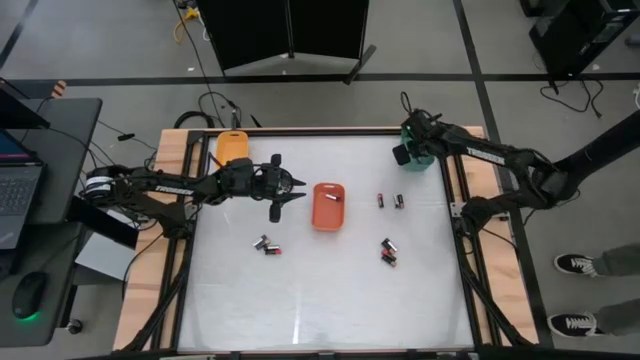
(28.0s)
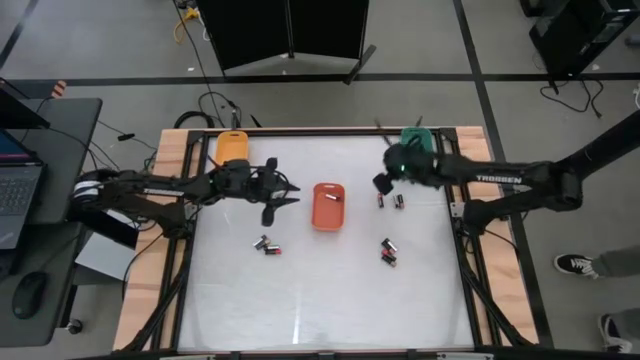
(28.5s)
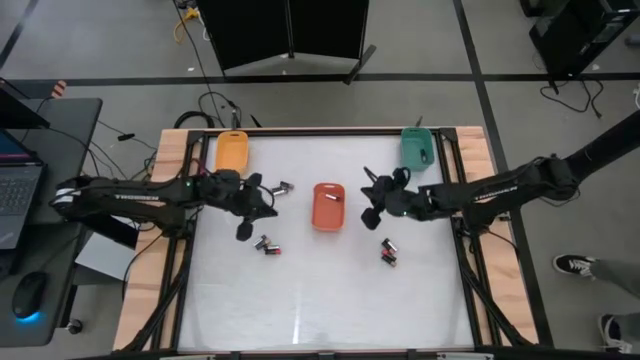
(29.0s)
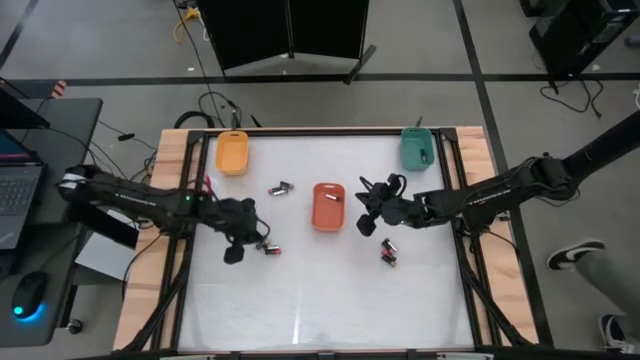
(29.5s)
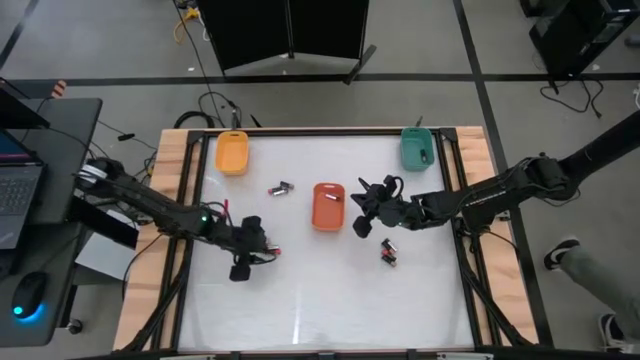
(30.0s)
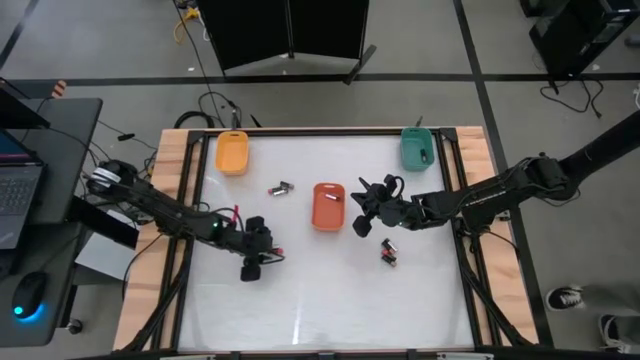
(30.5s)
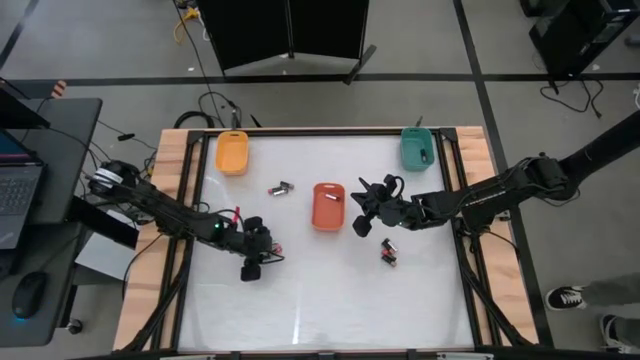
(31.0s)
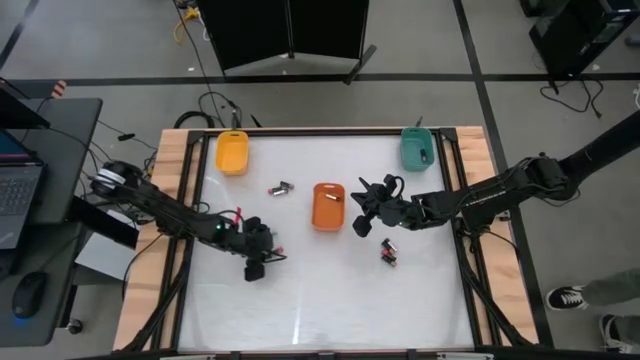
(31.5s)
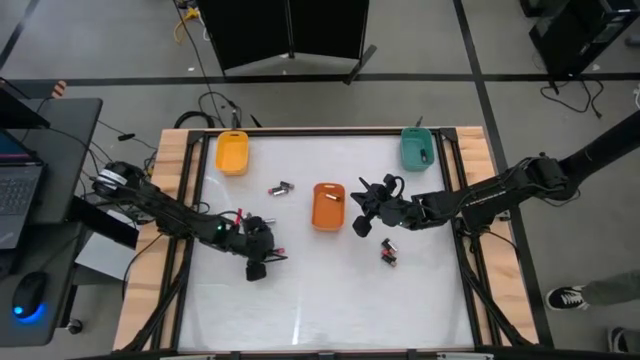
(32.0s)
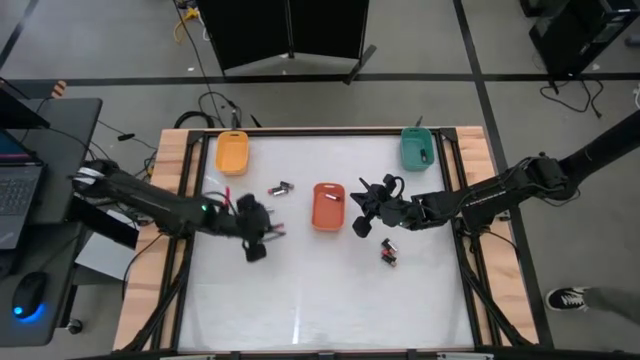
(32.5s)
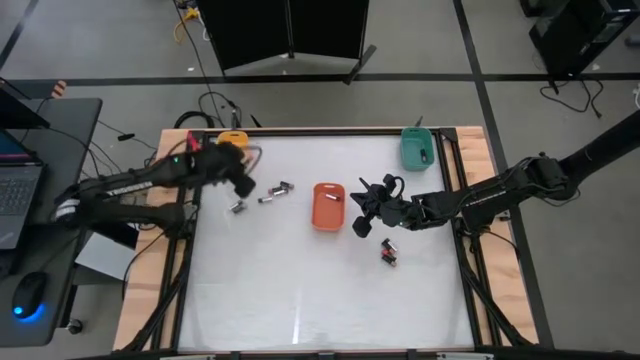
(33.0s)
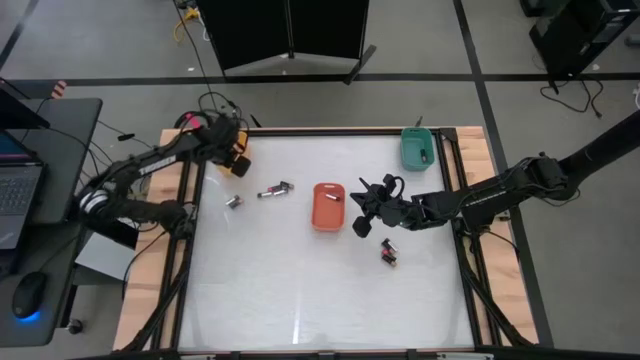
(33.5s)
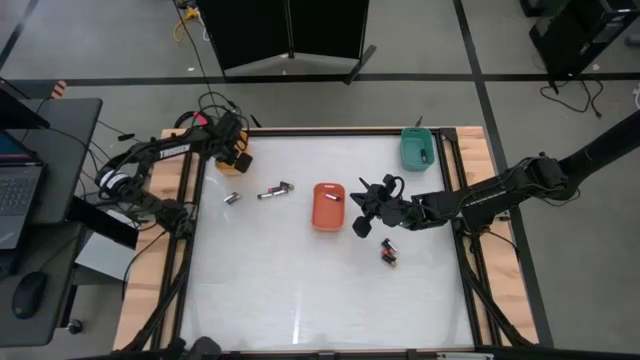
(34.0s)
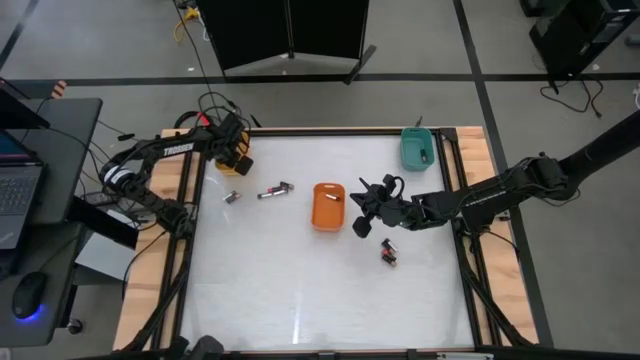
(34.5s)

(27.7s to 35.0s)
Task: Sort batteries
Put the black-red battery into the yellow bin

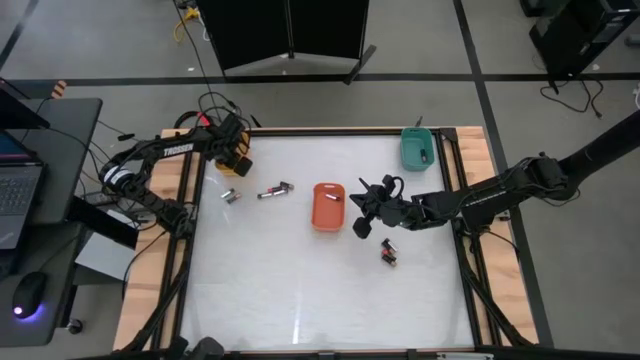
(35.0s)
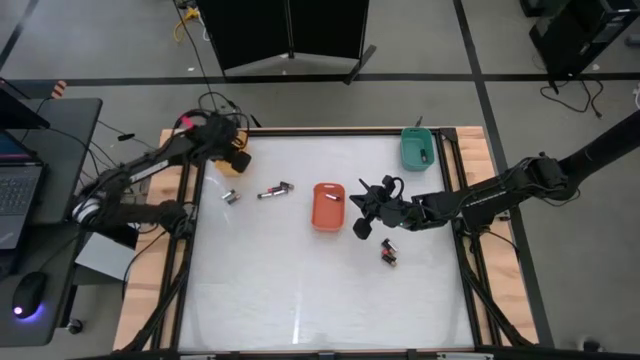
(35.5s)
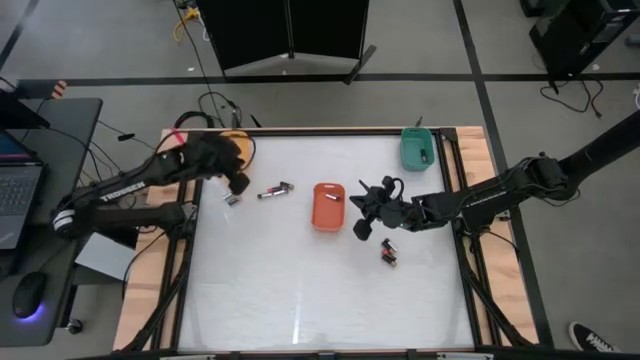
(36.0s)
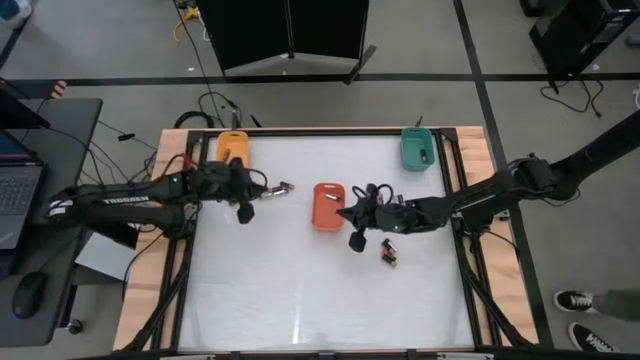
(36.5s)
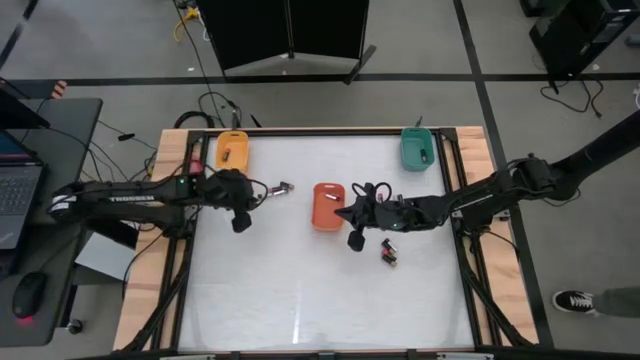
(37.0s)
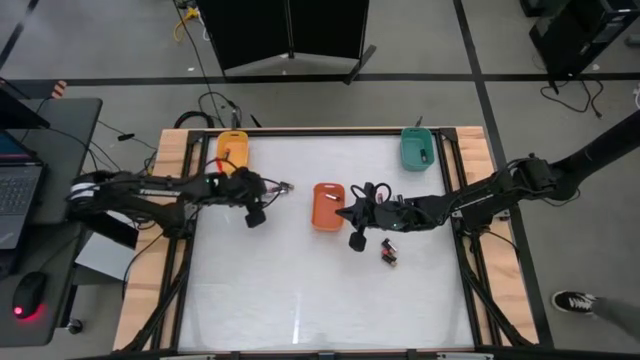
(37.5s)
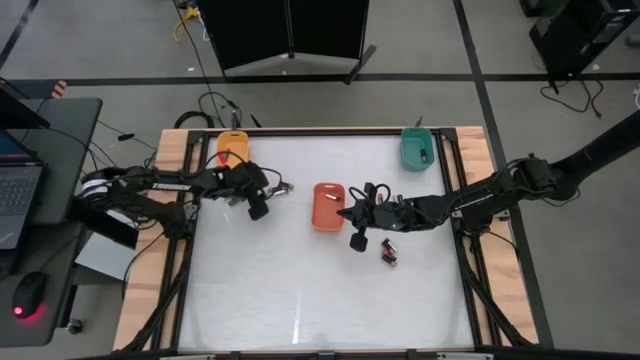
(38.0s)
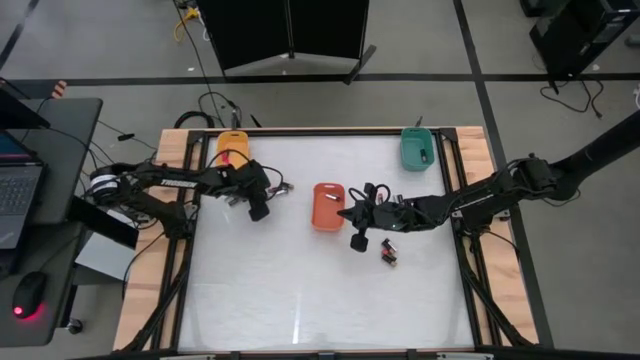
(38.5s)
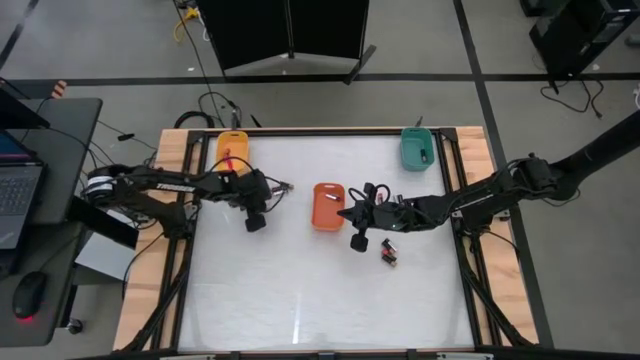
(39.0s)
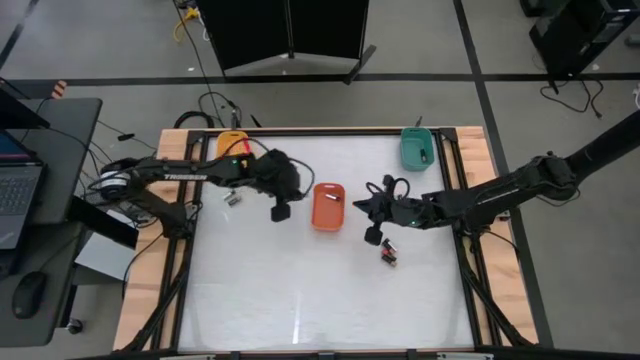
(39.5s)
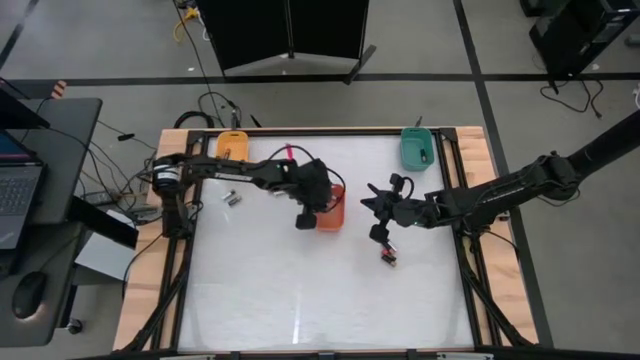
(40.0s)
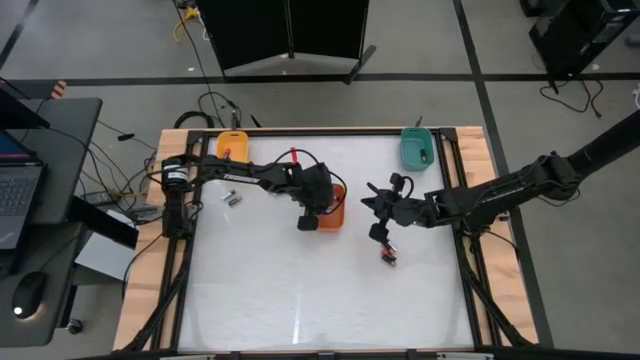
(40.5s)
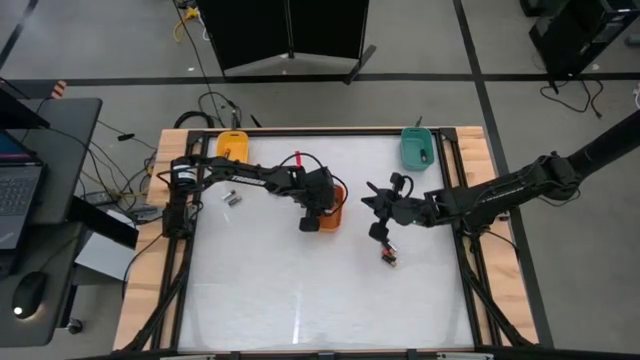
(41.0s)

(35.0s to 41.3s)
Put the silver battery into the orange bin

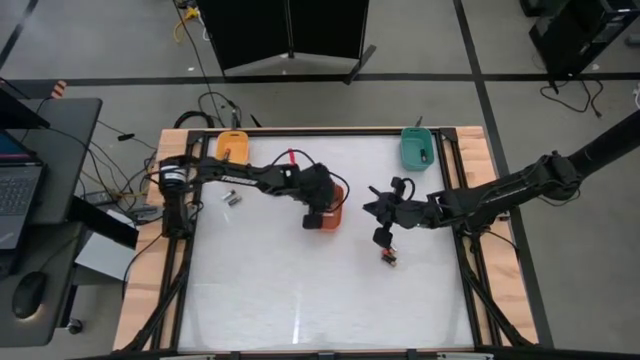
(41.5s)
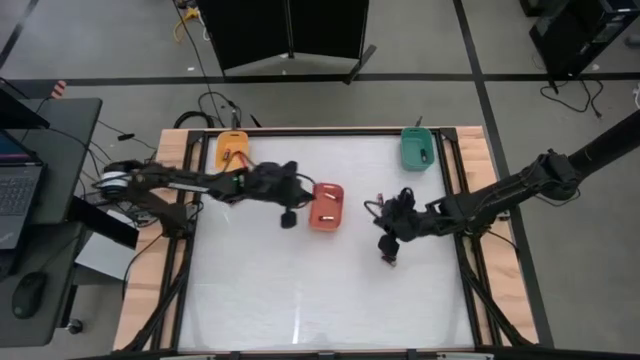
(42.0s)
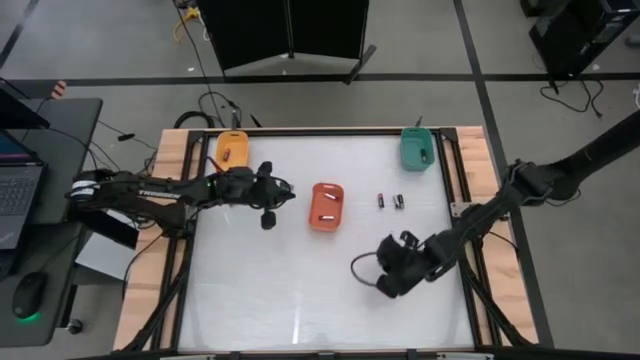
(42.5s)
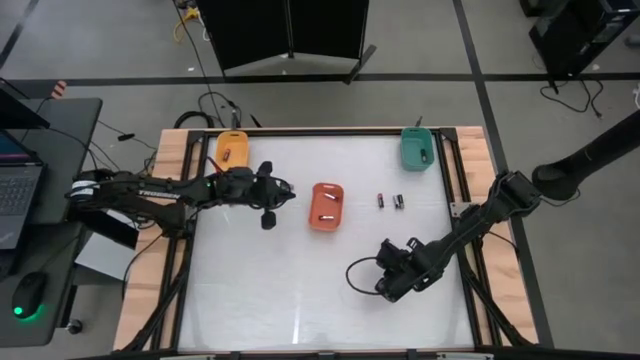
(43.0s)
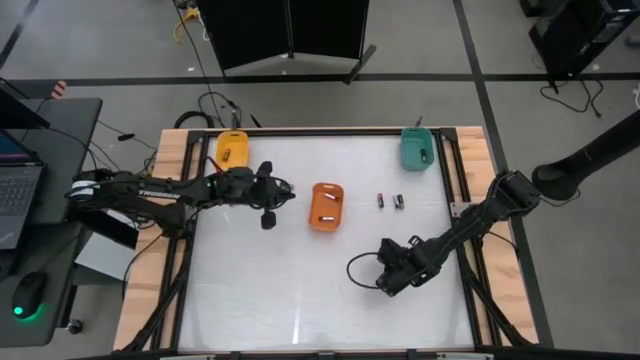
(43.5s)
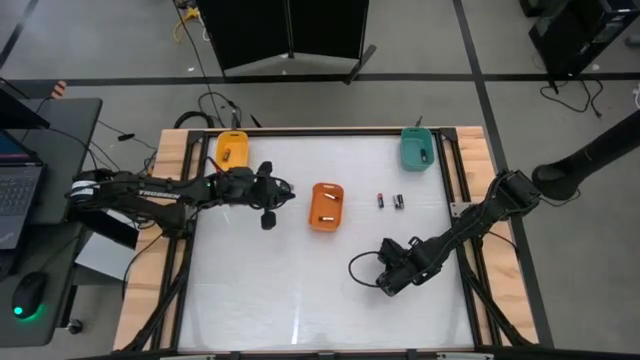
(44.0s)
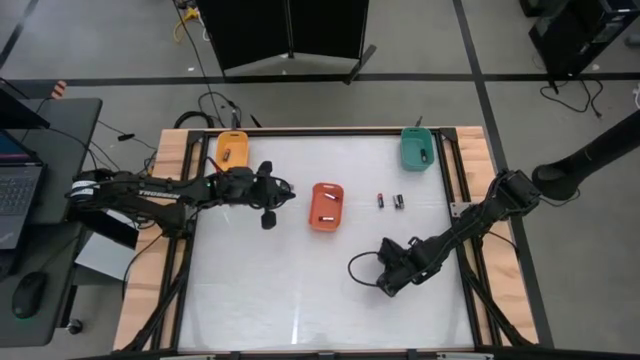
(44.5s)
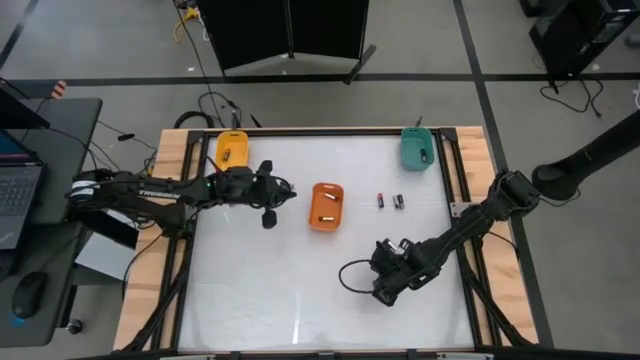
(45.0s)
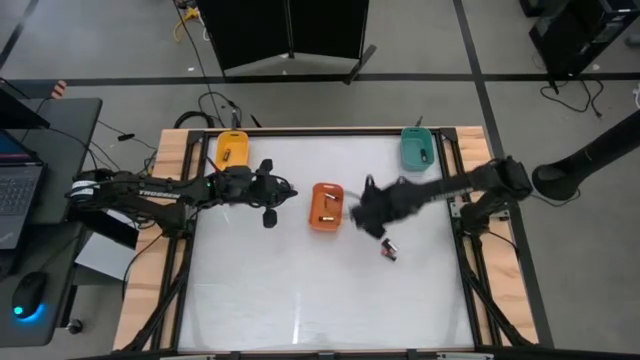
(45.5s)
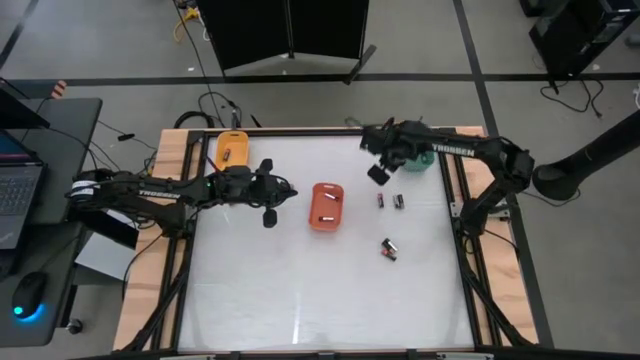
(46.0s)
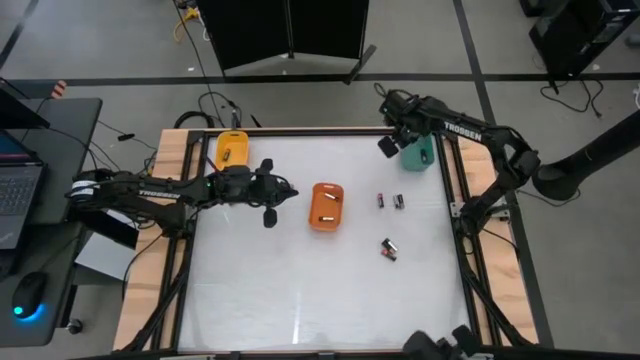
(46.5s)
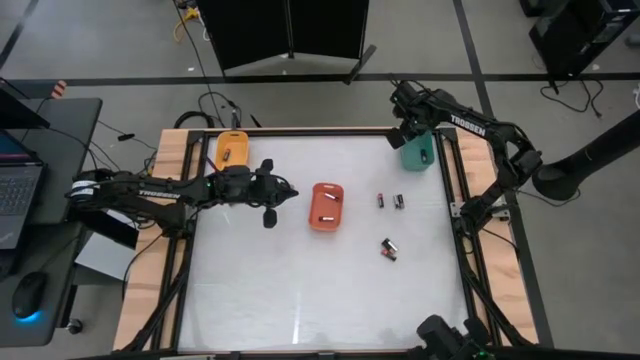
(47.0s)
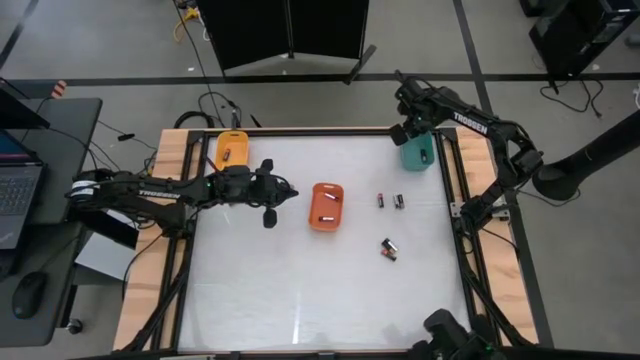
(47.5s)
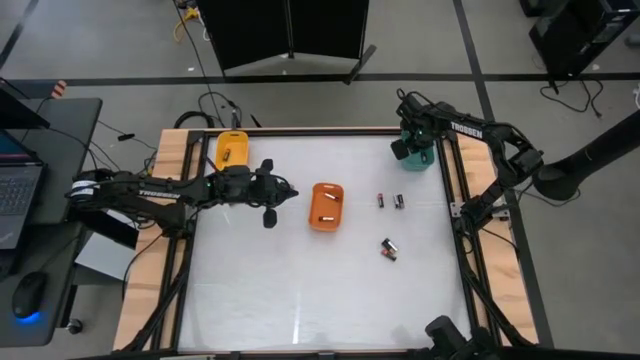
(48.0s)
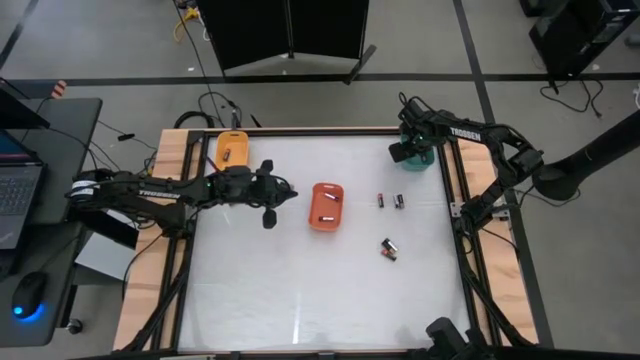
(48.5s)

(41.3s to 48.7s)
Put the black-brown battery into the green bin
